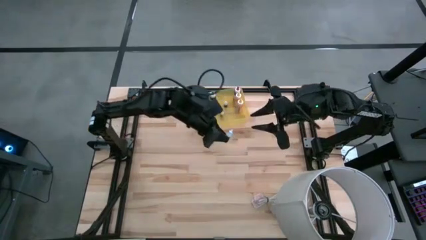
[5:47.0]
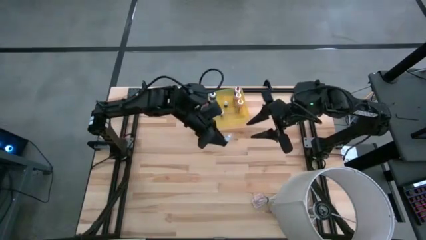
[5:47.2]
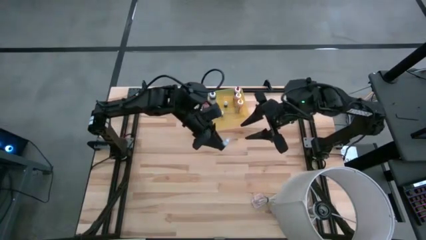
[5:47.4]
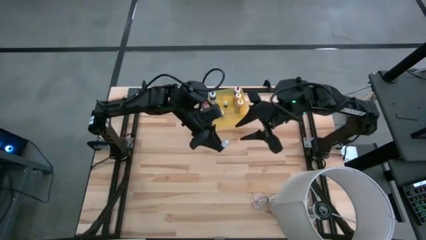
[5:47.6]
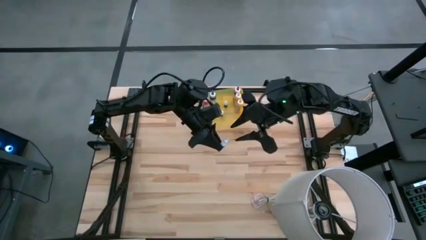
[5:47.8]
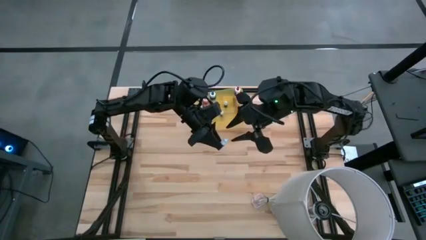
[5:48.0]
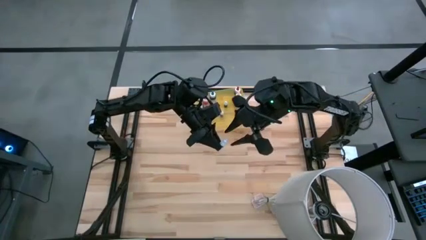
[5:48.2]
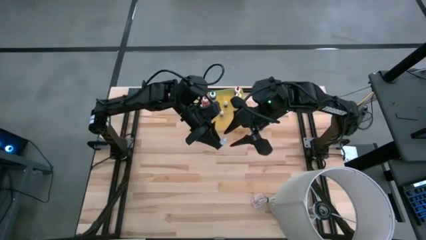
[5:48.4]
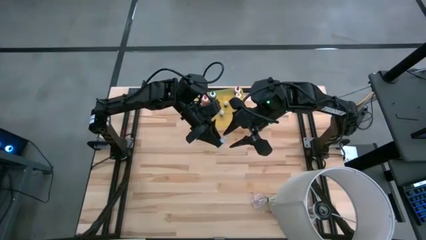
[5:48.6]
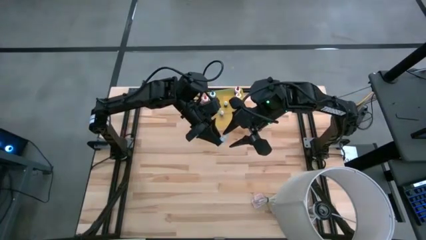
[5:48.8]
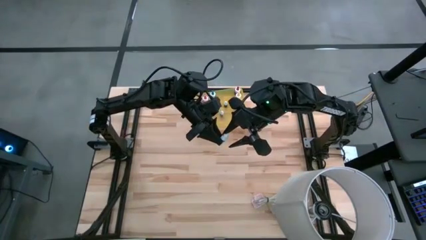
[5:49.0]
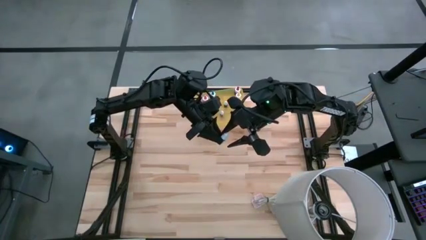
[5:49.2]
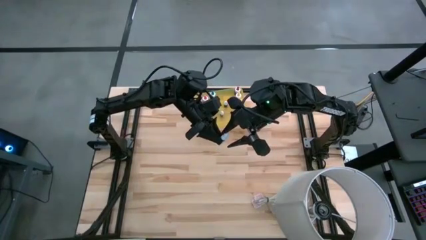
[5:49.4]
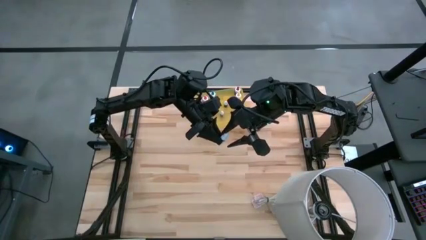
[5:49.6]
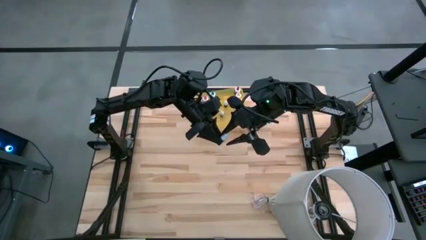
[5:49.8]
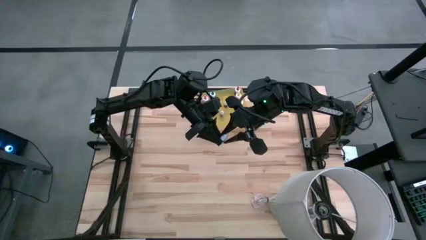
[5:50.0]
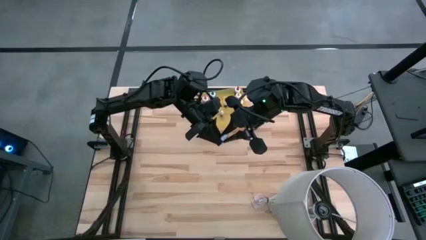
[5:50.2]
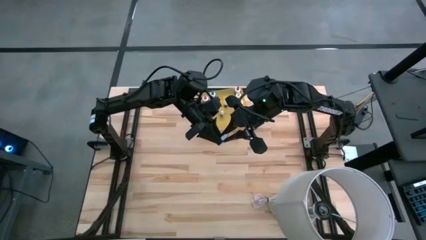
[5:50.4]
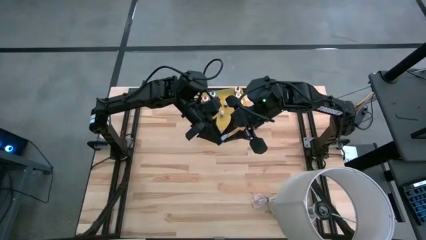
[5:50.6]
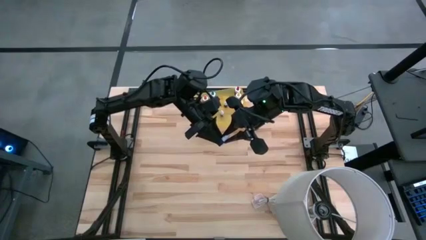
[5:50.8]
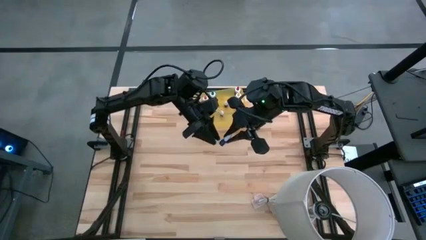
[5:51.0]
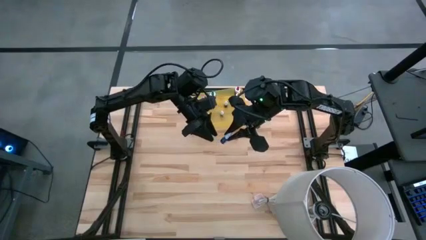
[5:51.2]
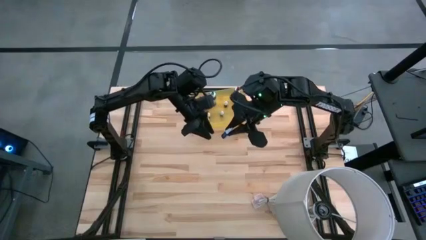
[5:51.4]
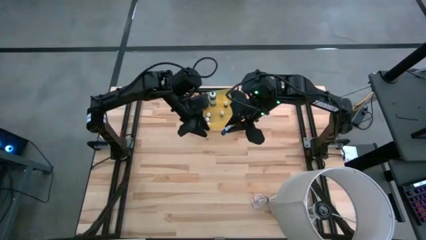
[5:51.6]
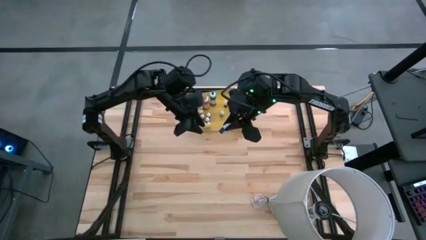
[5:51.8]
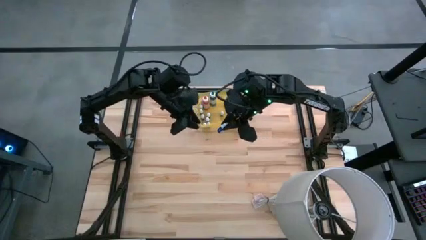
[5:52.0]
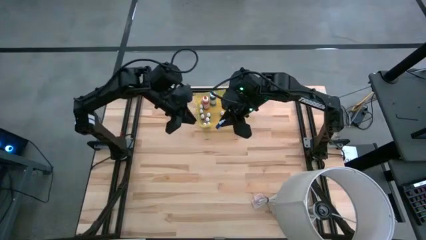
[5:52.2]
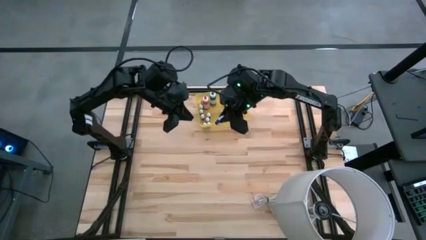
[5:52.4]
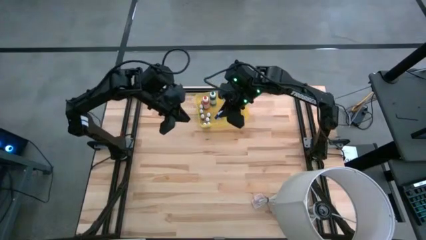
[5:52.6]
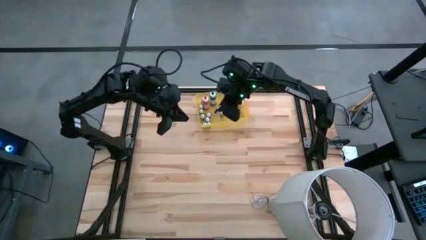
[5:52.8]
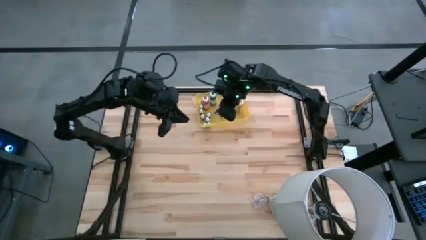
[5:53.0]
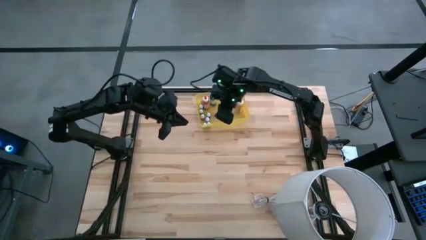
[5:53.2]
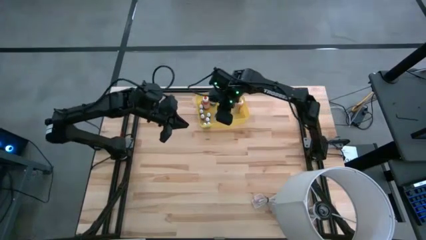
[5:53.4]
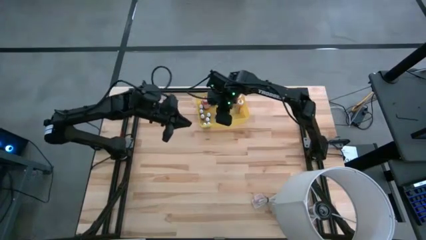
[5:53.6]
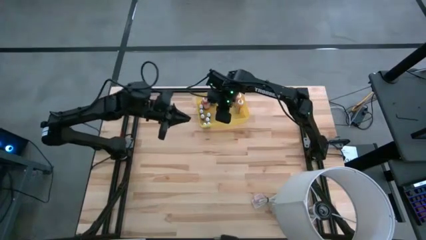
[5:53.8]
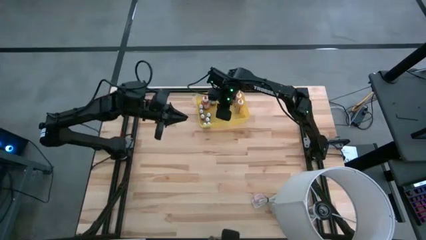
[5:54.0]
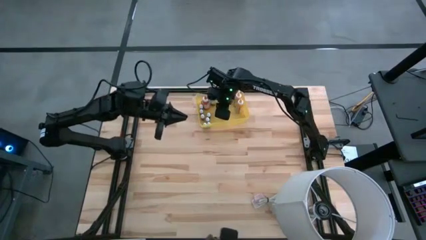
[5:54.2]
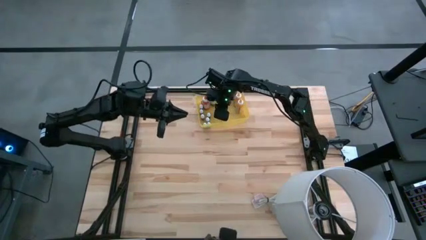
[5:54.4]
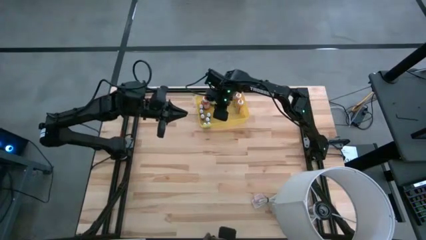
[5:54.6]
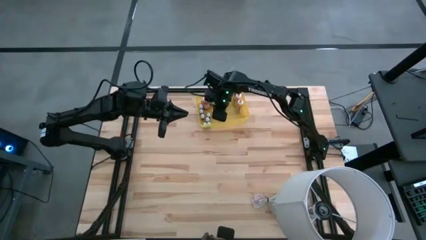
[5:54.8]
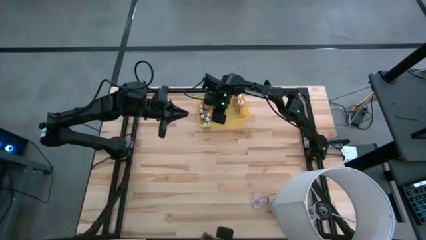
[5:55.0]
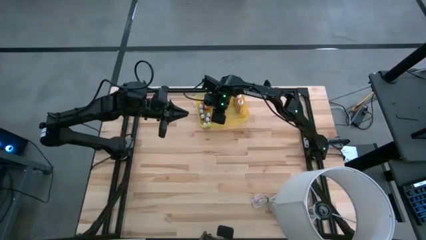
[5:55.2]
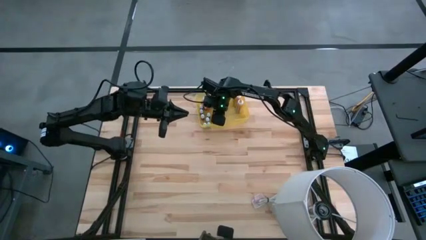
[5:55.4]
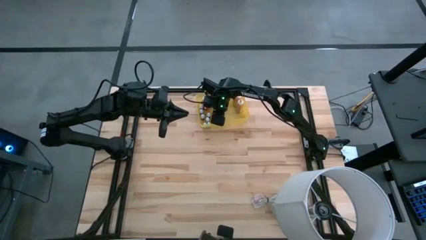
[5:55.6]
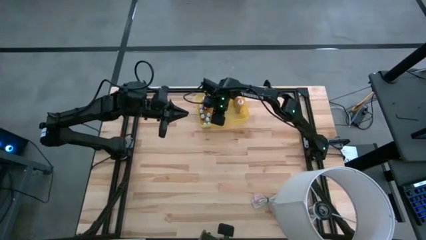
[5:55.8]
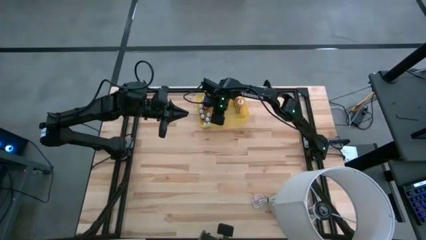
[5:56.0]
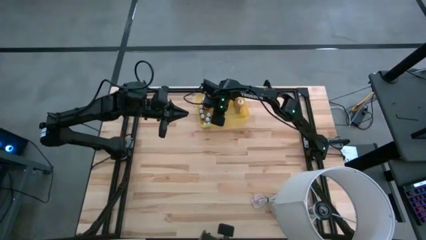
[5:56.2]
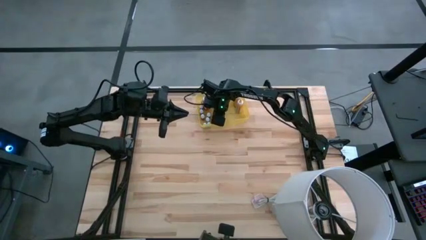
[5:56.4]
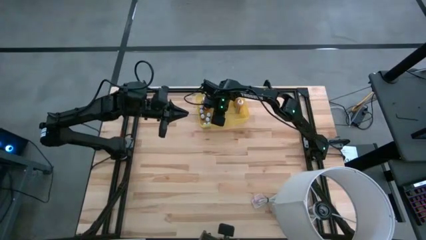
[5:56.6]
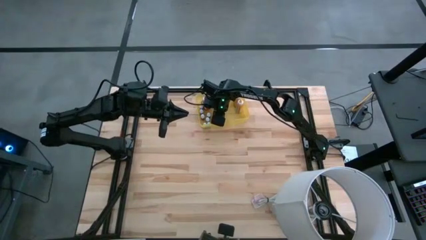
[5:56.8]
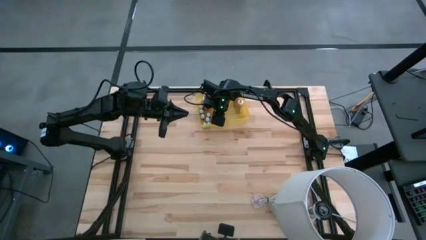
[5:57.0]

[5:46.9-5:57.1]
Task: Pick & Place food coloring
Put the small violet food coloring bottle into the yellow bin
